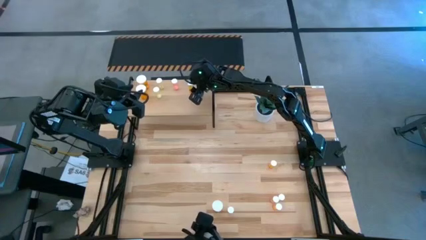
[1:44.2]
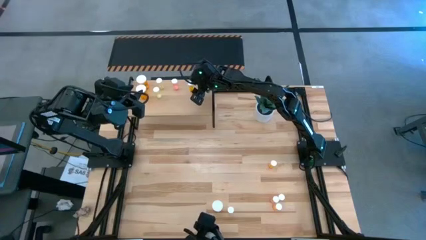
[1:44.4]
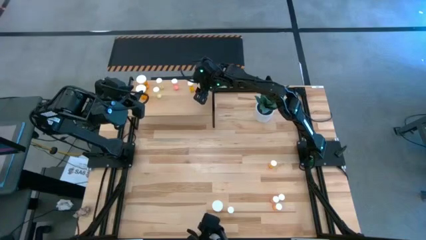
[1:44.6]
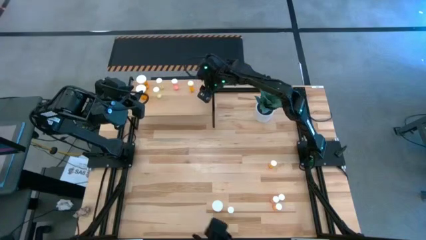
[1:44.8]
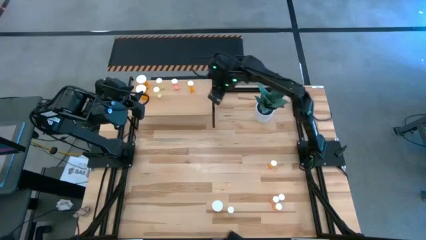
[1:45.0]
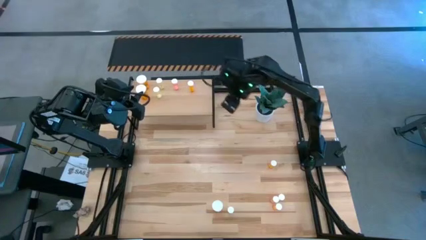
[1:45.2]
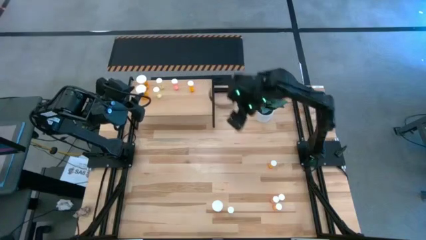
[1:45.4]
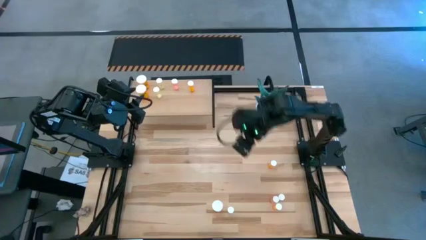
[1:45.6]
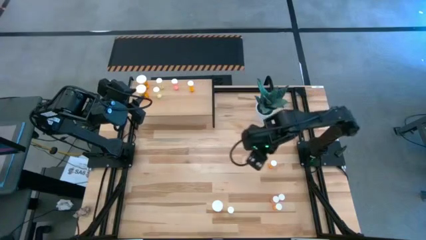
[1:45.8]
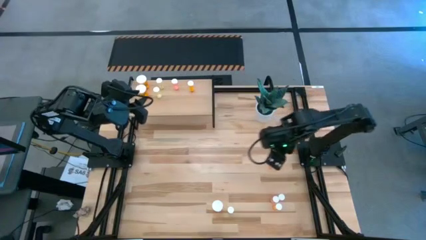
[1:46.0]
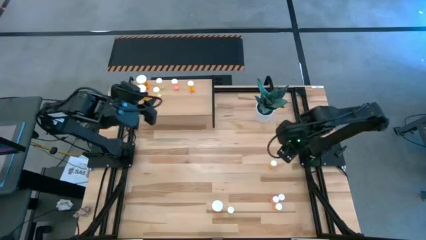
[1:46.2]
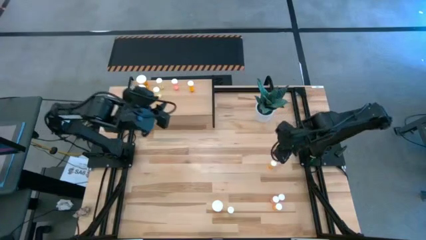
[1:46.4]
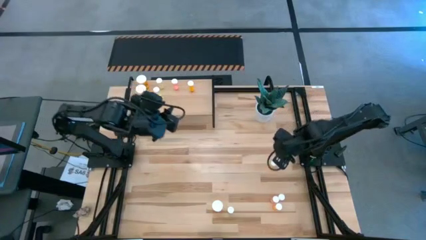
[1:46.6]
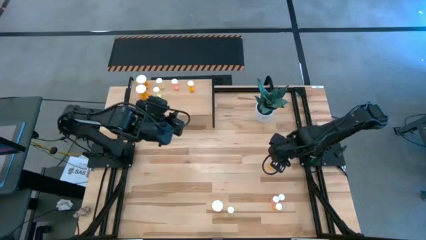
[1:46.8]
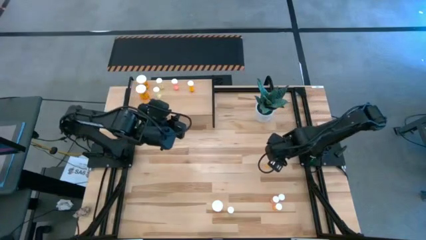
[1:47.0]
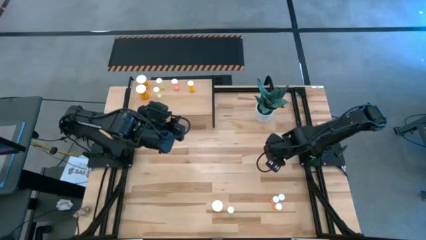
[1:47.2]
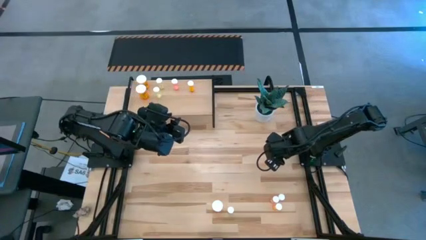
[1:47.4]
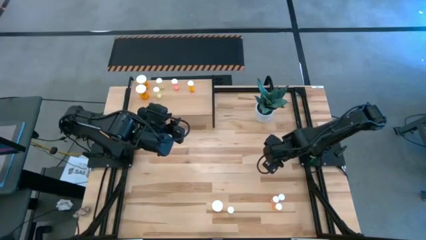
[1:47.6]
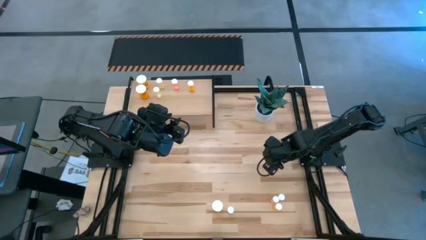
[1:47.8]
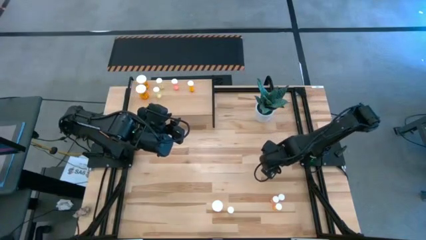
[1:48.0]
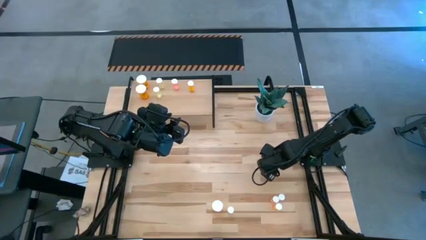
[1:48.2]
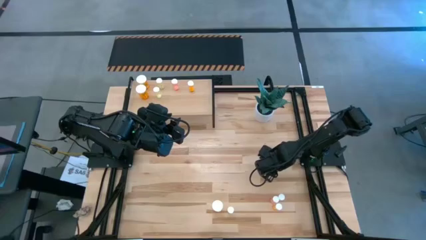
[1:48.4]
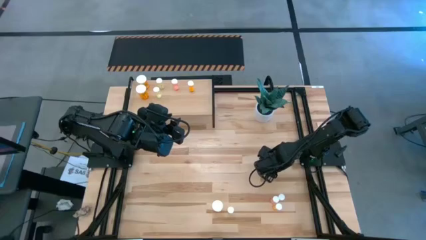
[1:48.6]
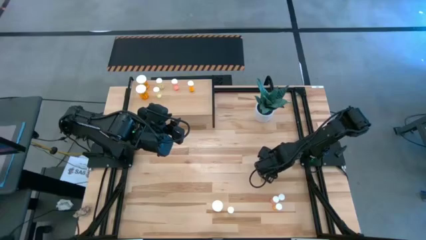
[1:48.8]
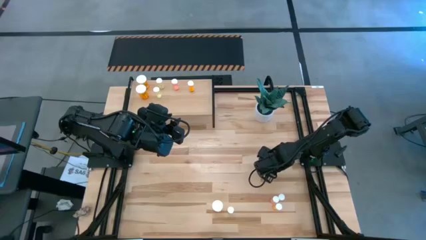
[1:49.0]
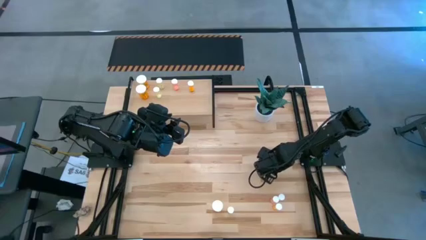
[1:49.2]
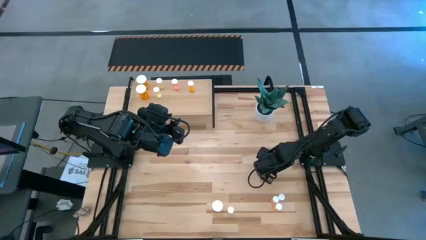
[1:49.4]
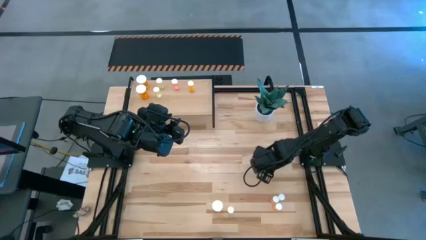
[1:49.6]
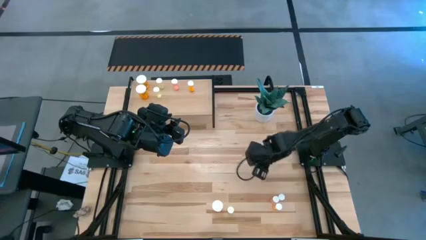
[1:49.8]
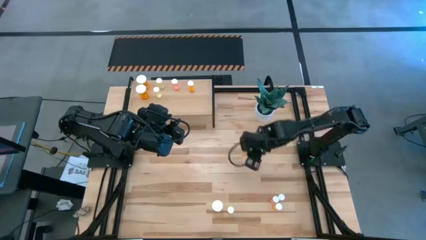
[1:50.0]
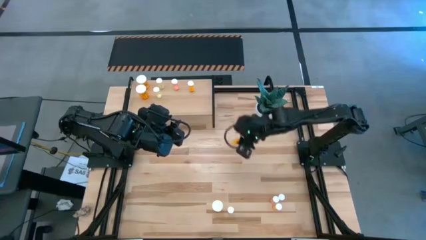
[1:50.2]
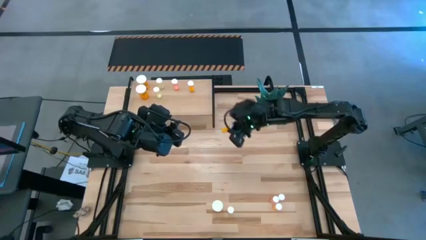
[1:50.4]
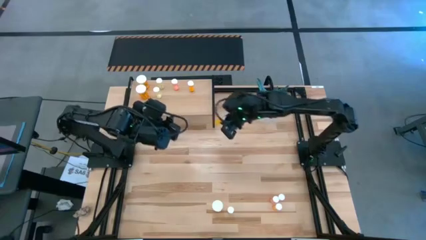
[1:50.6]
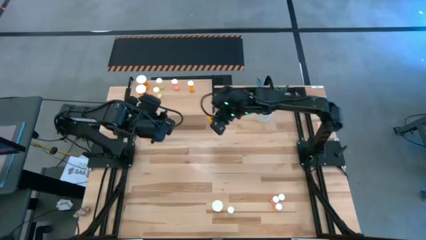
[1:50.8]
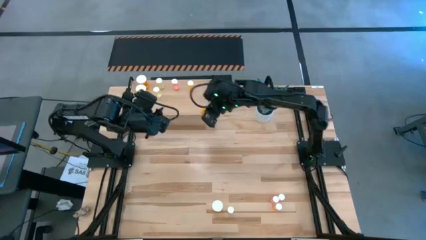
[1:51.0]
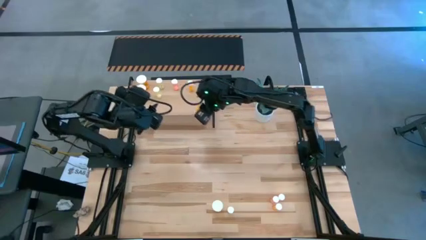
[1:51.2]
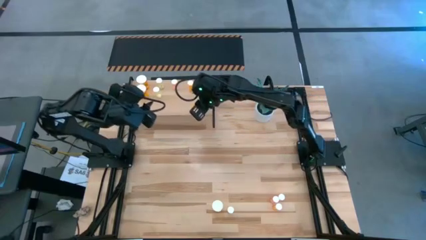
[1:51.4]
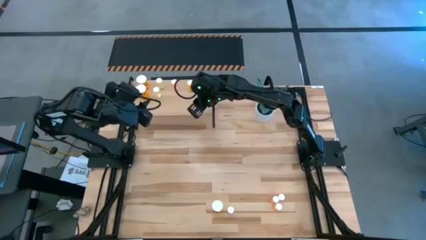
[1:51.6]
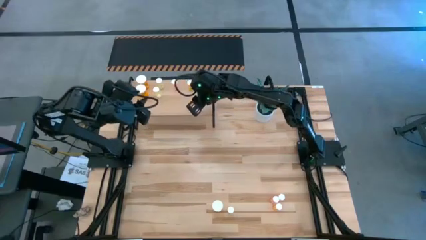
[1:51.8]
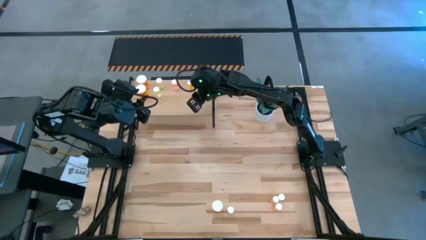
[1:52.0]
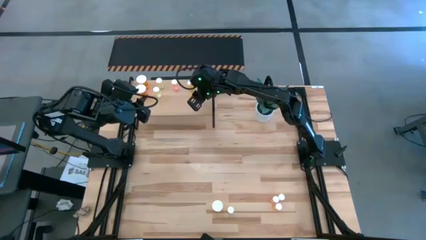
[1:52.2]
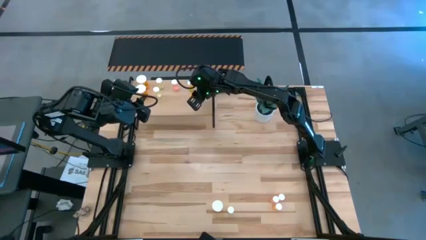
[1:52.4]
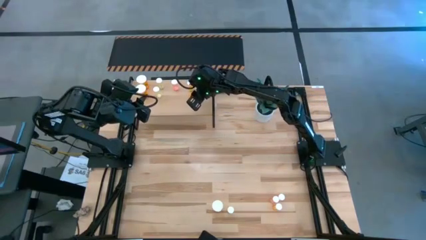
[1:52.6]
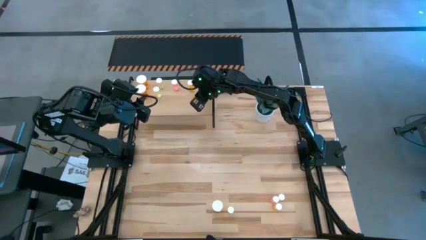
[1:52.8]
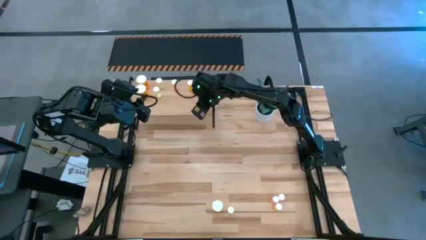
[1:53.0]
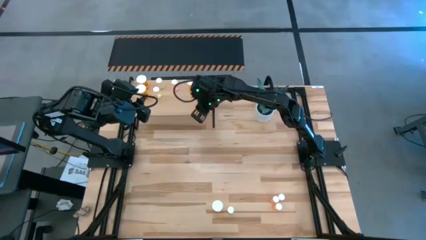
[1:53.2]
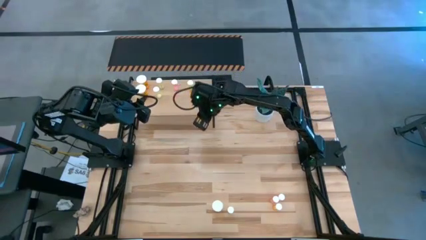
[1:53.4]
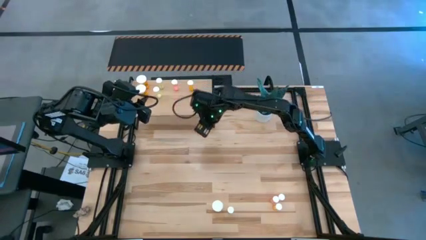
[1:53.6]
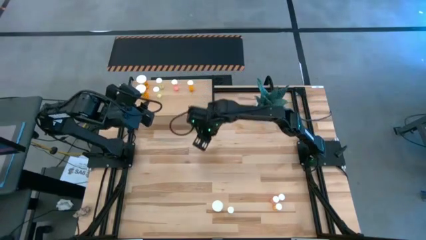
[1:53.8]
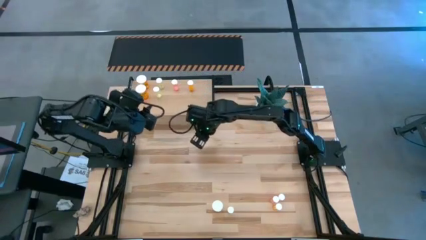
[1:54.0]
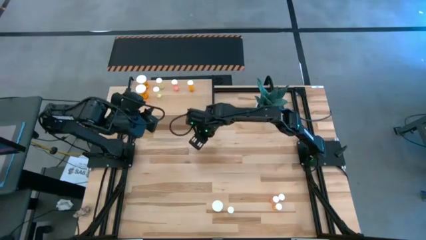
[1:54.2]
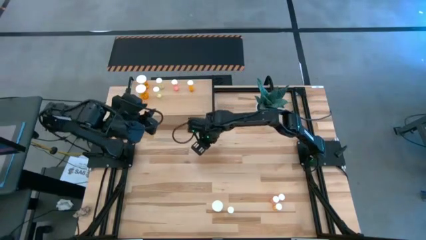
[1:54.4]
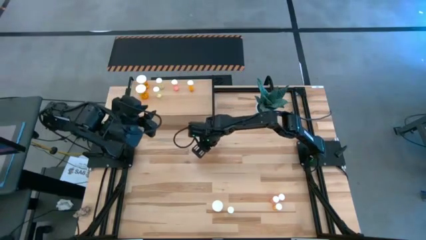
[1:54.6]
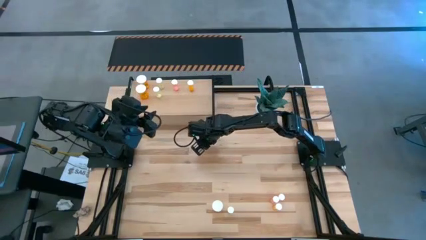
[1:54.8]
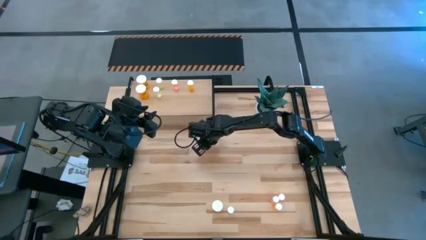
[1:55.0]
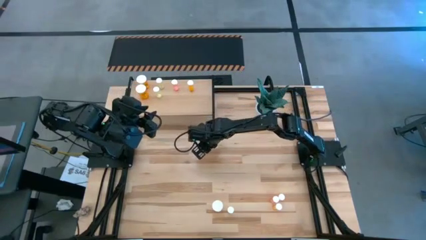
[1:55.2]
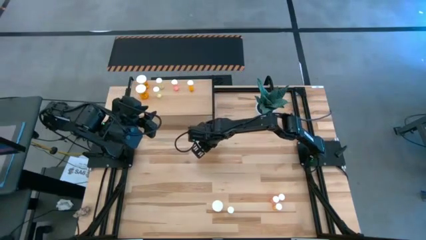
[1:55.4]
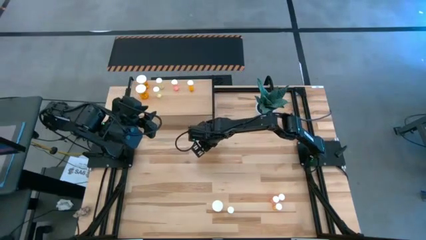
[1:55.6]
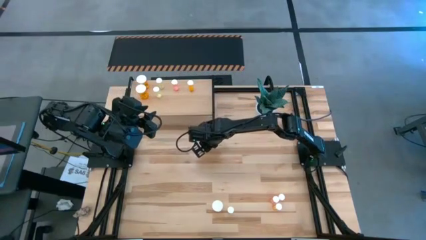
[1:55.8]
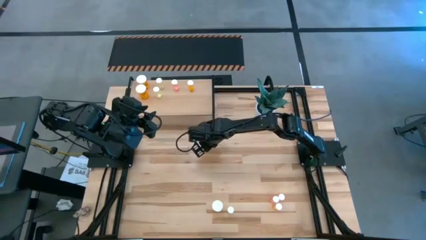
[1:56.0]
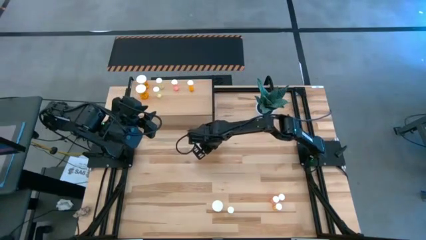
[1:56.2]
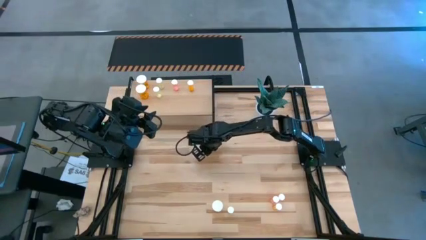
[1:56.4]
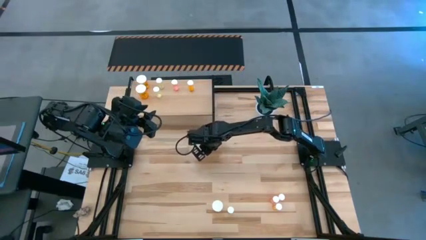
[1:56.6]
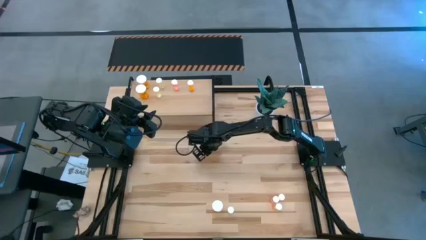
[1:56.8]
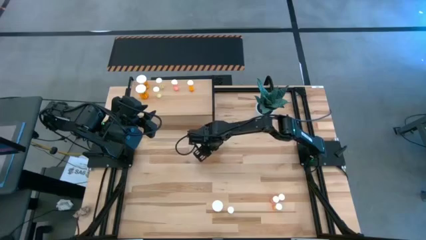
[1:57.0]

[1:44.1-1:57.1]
Task: Pick and place medicine bottles onto shelf by color
Move the small orange pill bottle to the center of the table
